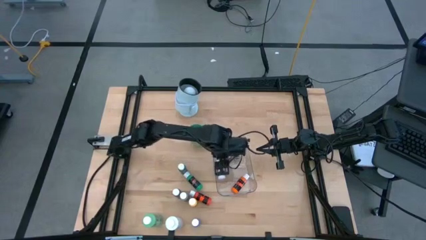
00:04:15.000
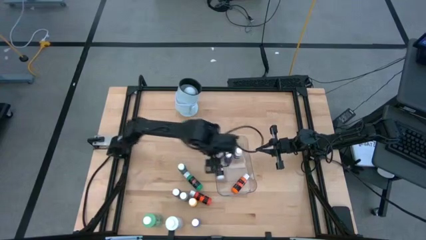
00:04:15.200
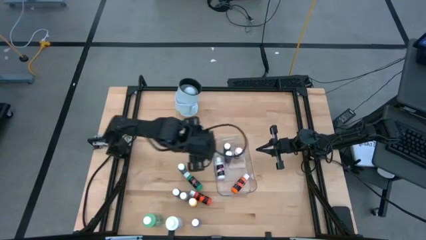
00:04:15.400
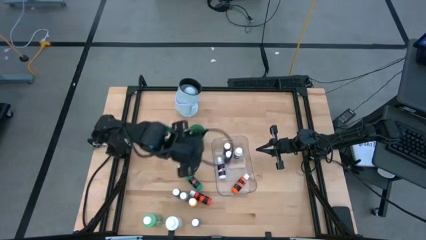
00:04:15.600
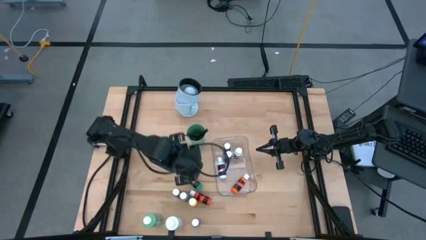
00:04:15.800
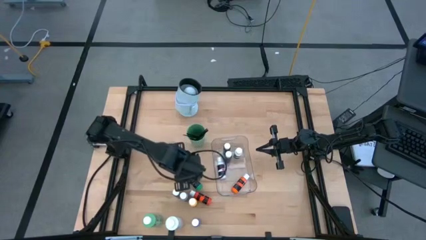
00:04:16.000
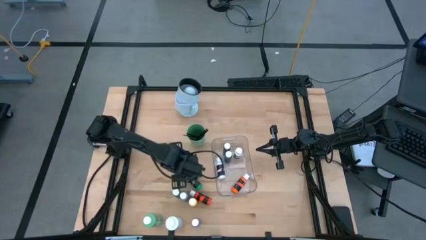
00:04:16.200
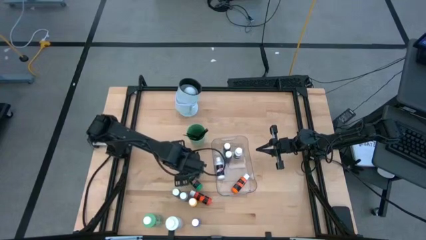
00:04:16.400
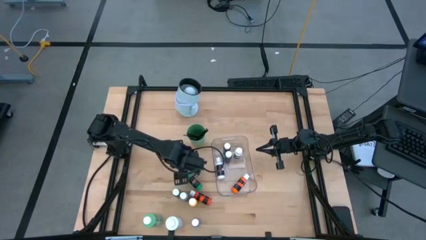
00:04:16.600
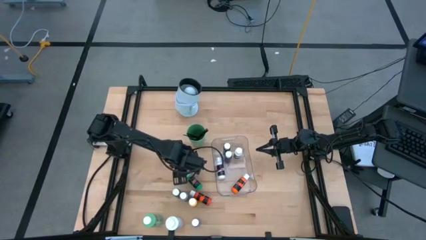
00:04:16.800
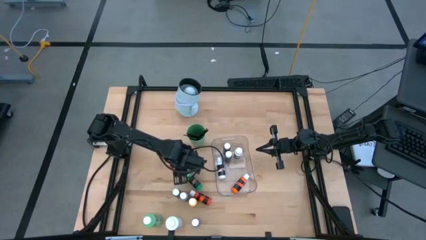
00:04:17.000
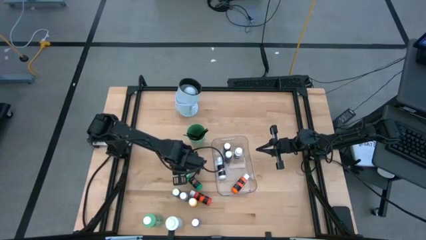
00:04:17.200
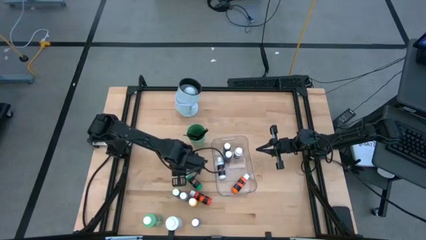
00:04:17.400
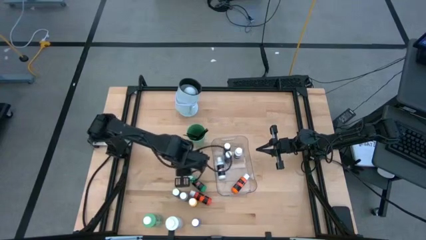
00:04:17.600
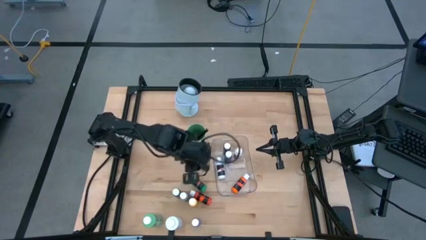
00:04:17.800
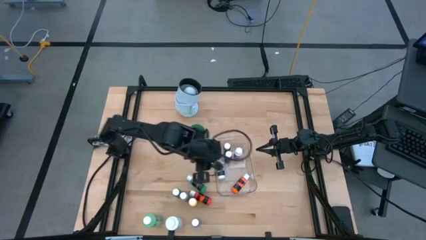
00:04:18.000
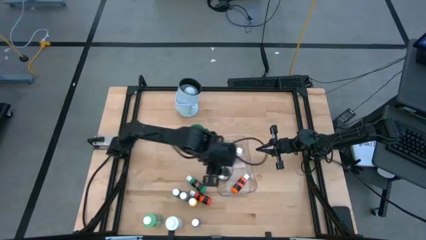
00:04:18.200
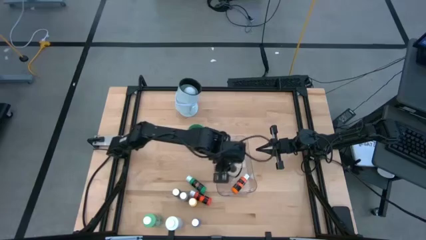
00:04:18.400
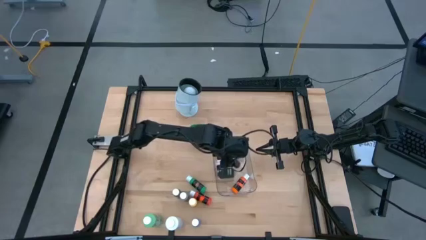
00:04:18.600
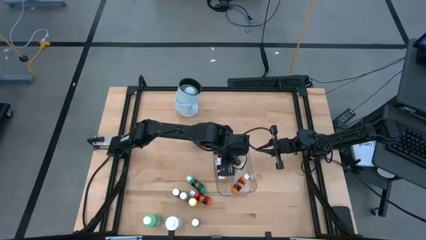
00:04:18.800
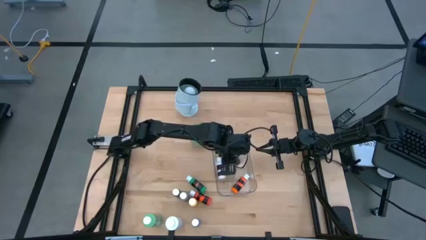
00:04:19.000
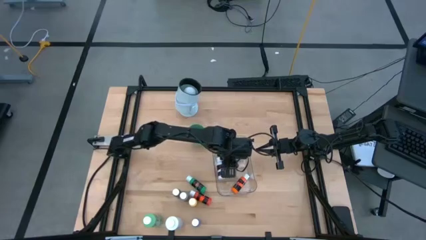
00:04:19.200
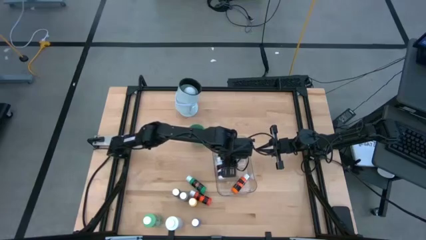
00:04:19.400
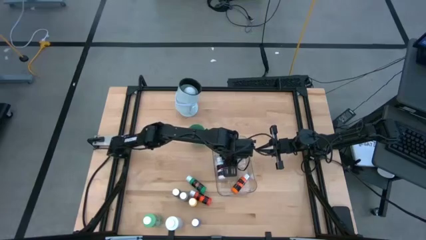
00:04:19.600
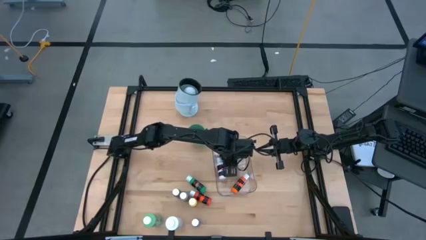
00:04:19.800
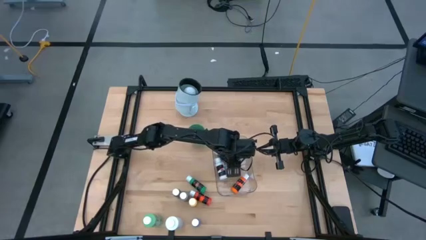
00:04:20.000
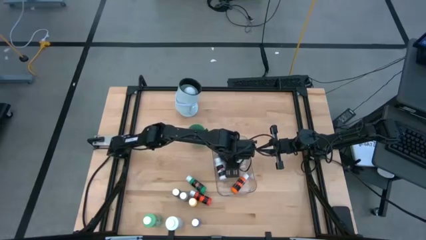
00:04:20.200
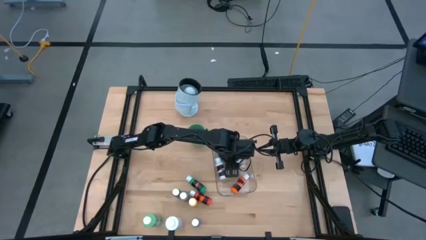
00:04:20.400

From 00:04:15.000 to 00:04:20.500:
Task: Pick & Place Paint Supplies
Put the small green paint bottle into the transparent bin

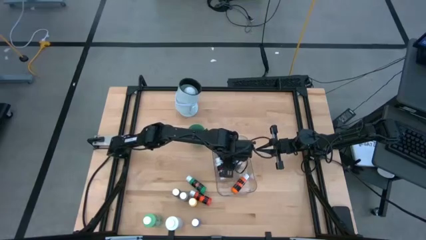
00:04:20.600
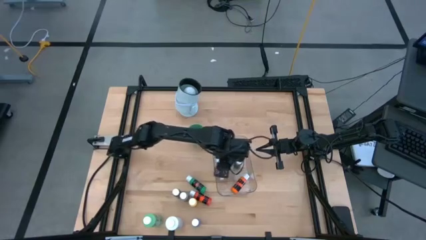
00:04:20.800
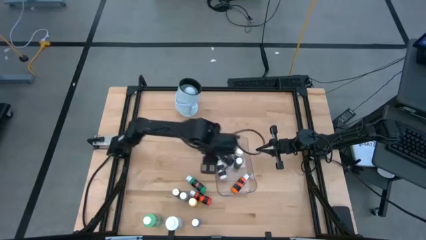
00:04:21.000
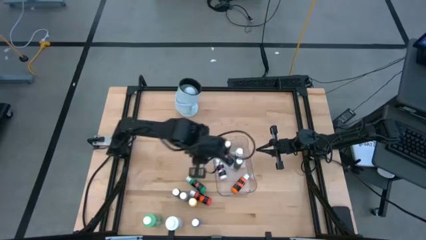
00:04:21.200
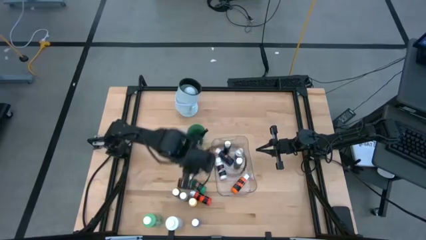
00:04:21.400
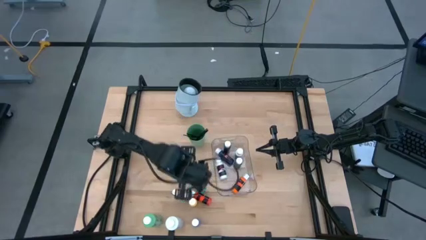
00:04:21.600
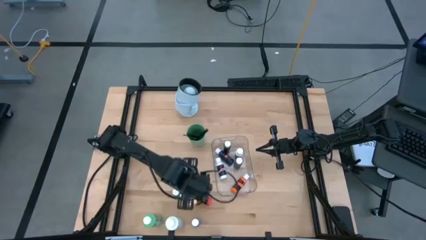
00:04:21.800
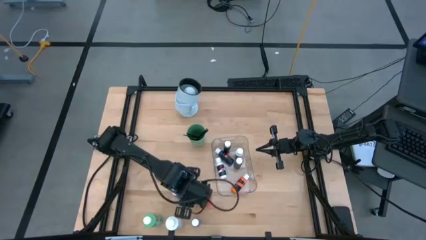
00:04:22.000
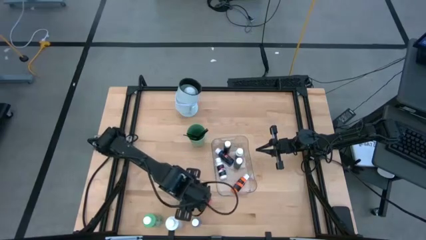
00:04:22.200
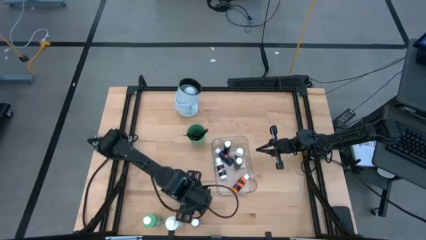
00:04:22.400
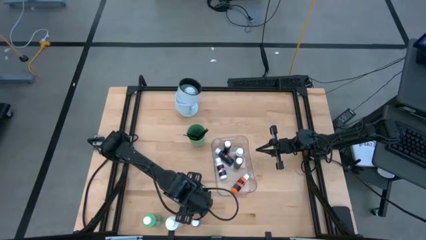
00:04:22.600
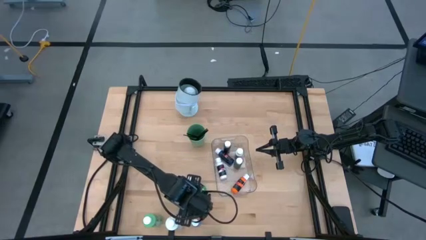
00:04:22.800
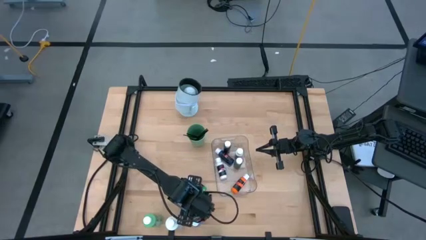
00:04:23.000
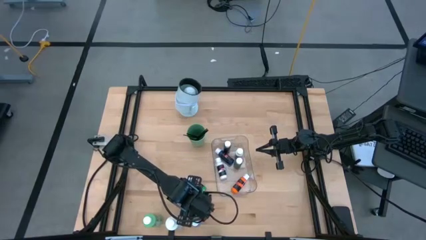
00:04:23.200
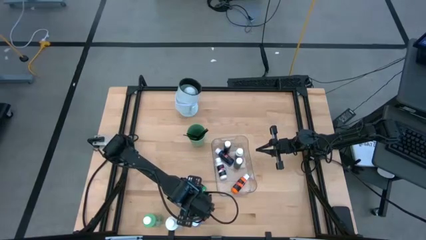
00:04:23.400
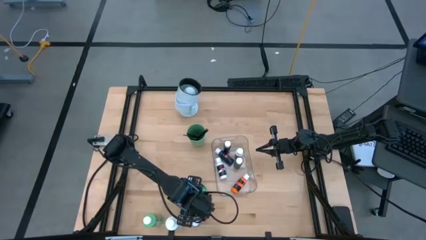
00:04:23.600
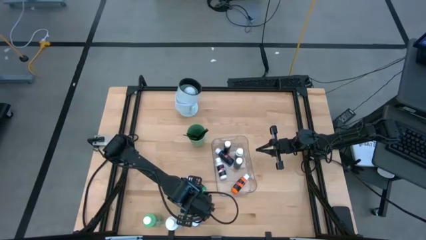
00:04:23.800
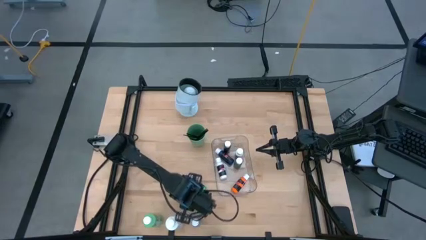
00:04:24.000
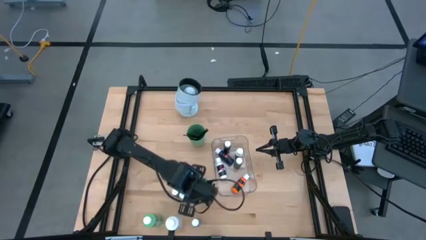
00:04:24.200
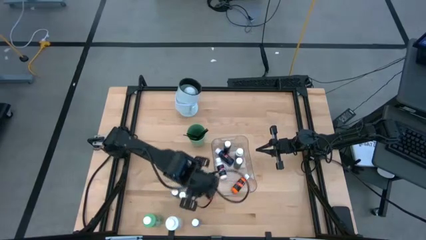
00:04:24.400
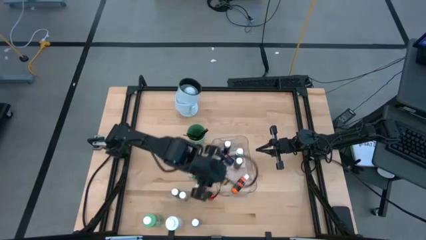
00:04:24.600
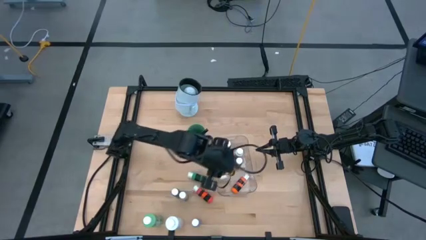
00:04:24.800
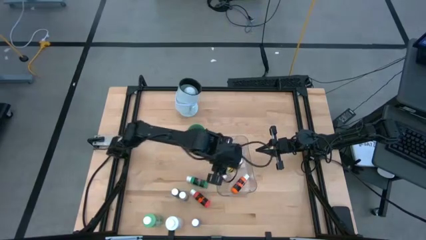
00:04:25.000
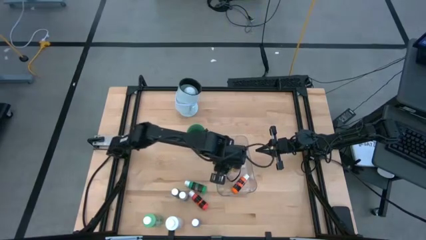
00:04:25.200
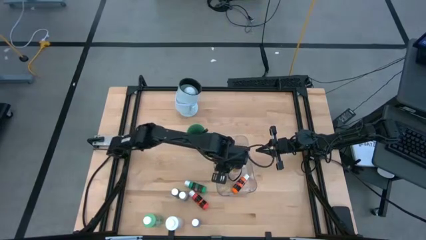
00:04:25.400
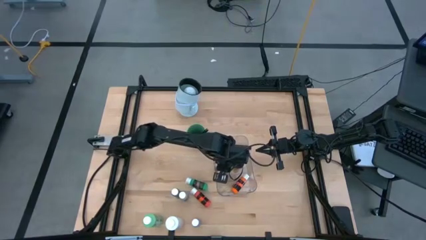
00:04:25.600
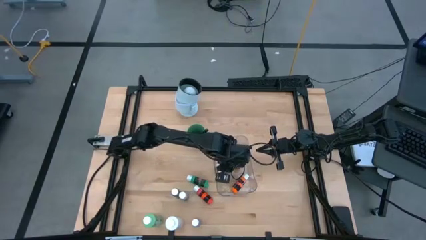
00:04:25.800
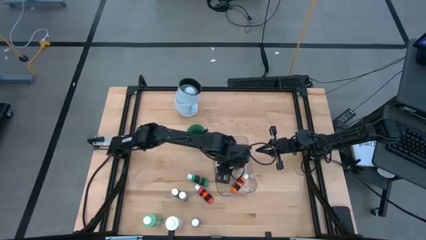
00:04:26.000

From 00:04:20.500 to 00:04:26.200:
Put the small yellow paint bottle into the transparent bin

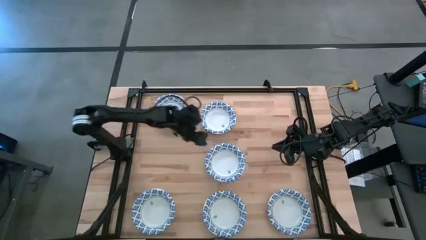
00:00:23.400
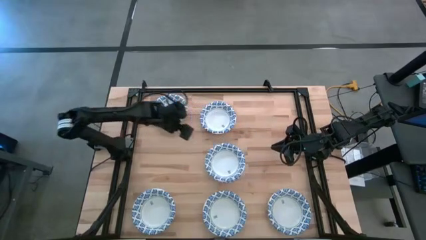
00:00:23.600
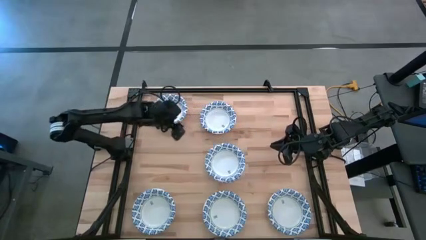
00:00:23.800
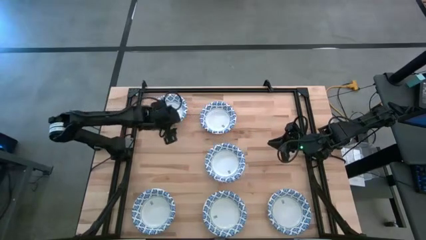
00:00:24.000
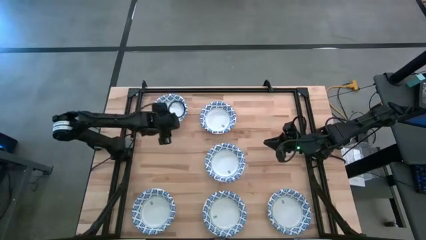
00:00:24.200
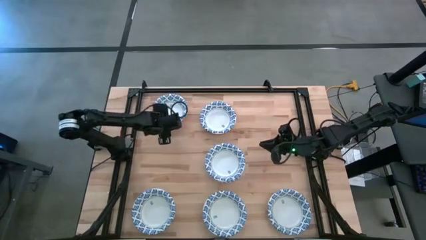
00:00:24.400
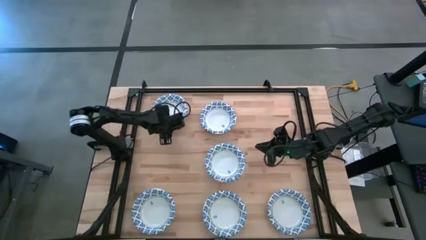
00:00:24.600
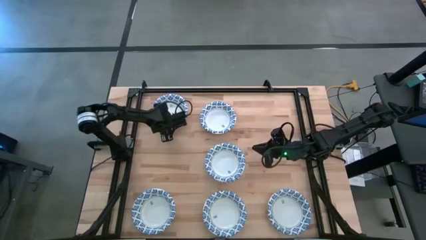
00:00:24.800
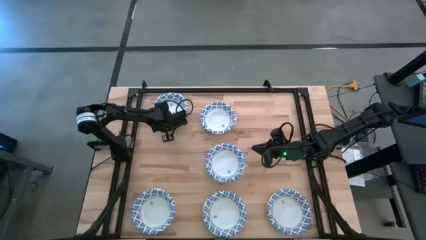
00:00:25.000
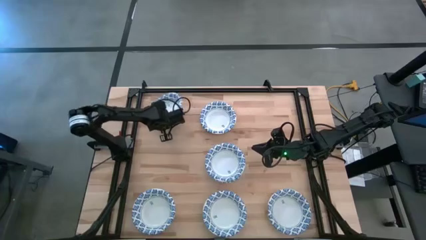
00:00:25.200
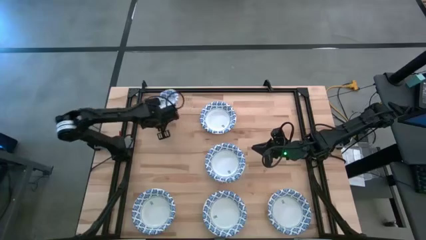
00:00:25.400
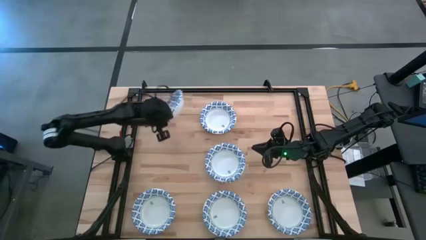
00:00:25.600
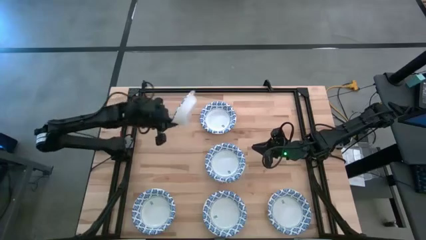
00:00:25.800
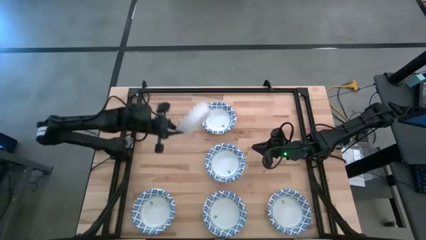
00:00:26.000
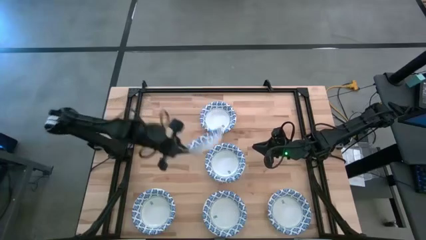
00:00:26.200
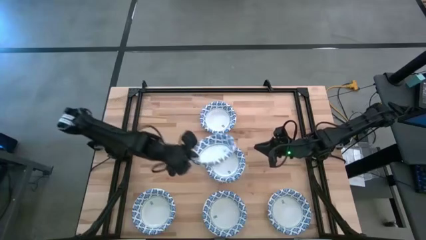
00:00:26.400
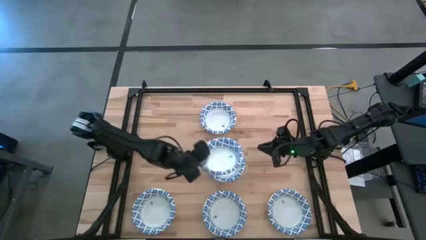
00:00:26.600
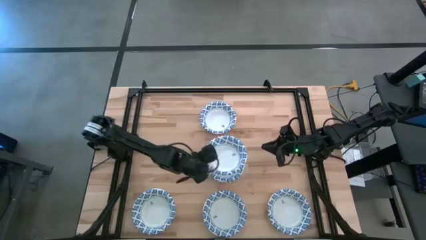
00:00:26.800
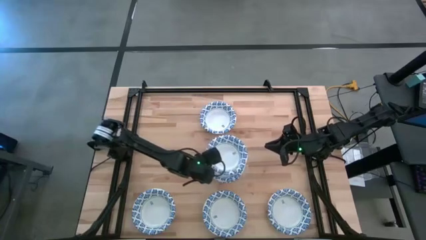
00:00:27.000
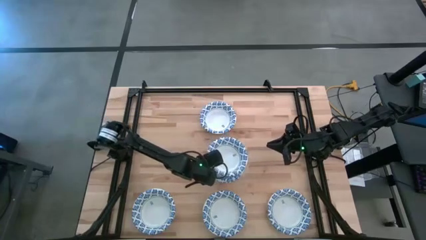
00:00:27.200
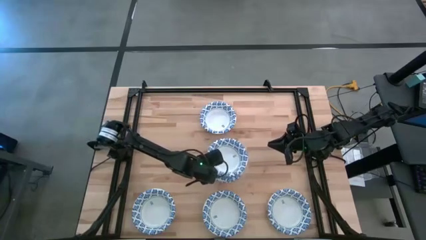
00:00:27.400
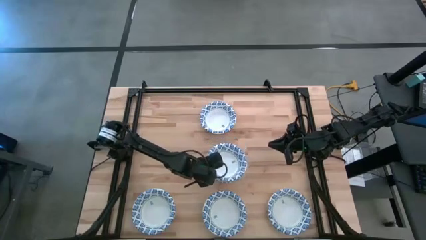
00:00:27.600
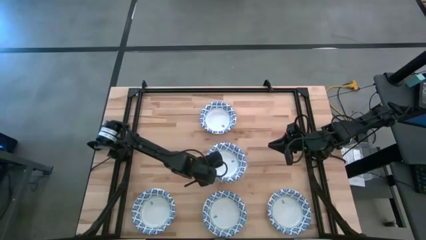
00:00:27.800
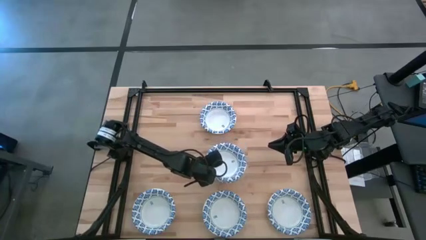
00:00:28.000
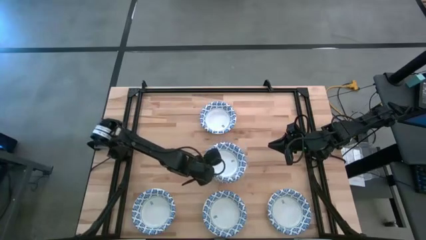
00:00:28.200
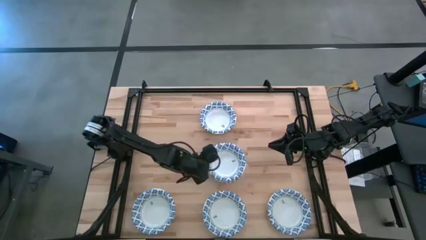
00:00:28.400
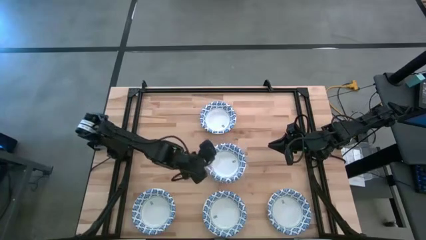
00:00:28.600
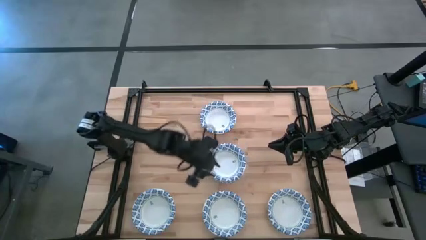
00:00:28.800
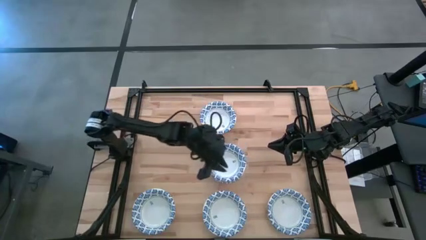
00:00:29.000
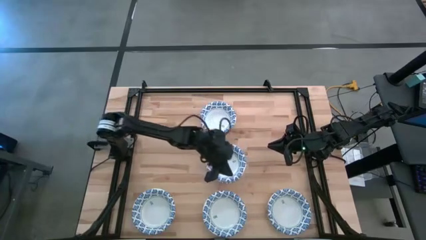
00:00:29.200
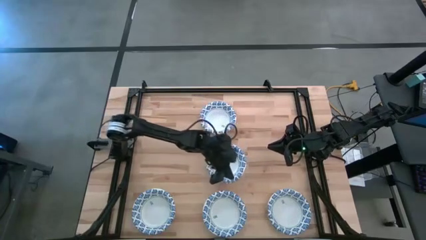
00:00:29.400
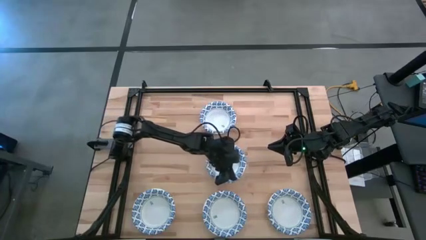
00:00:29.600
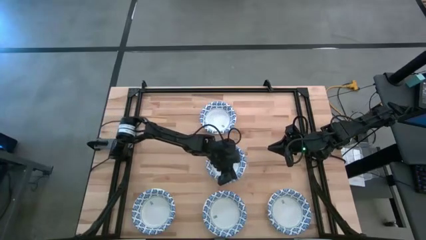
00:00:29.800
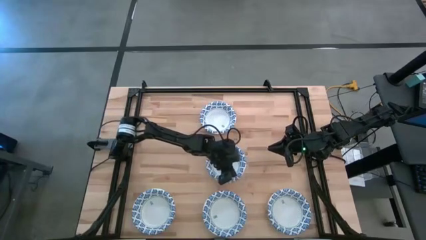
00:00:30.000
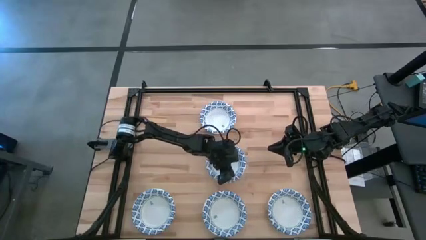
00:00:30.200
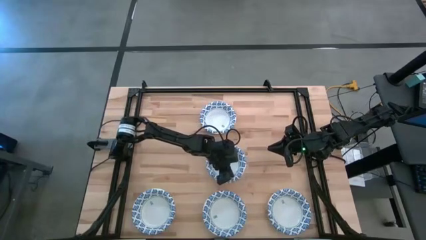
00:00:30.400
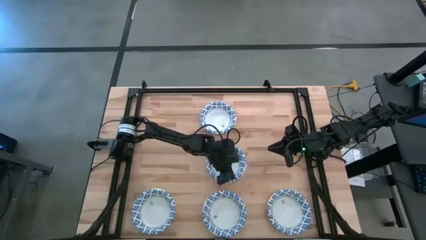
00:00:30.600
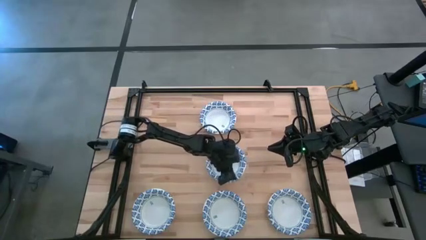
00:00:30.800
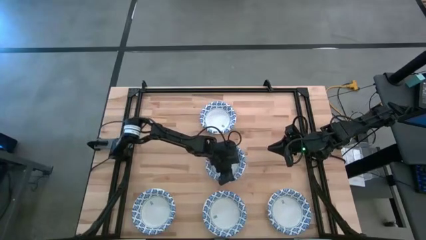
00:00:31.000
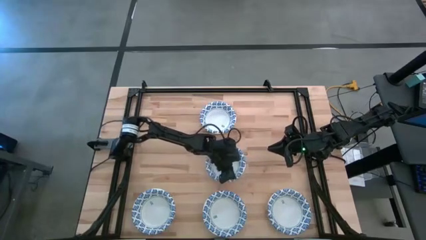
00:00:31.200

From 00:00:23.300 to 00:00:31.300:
Task: Nest bowls inside each other
Stack the white patterned bowl on top of the other white patterned bowl
